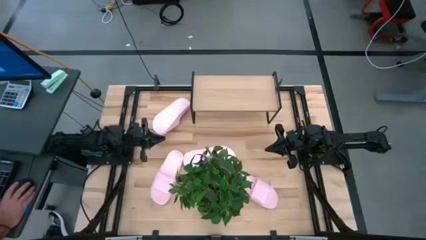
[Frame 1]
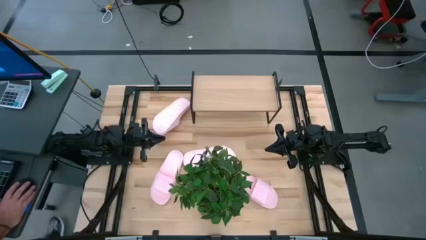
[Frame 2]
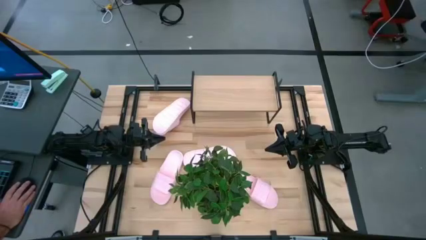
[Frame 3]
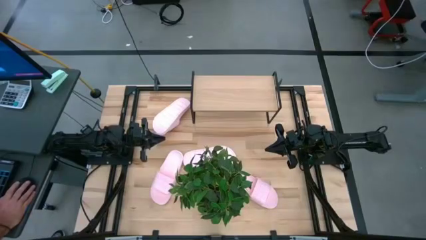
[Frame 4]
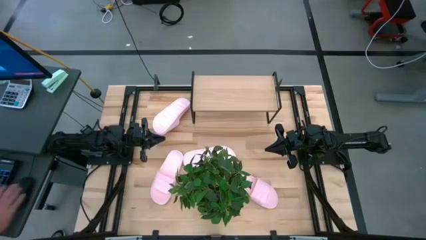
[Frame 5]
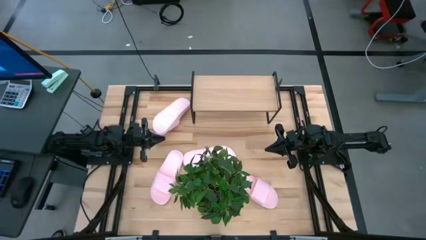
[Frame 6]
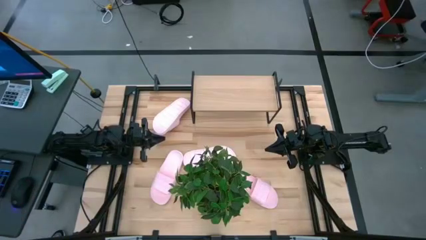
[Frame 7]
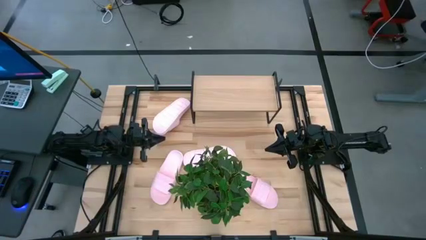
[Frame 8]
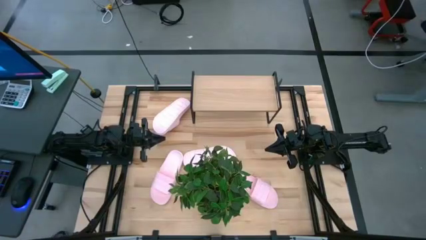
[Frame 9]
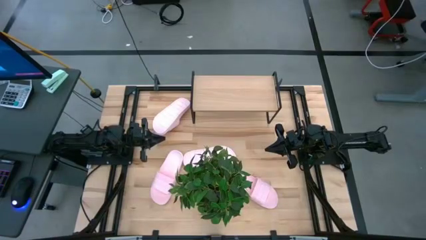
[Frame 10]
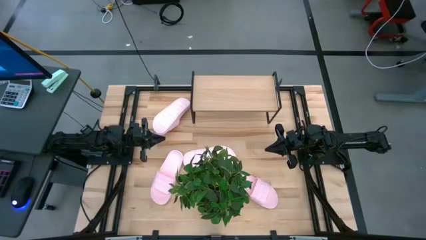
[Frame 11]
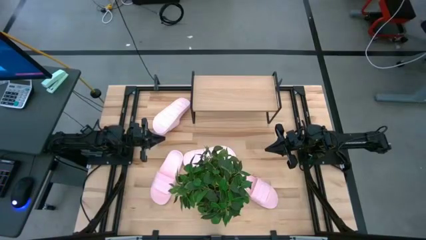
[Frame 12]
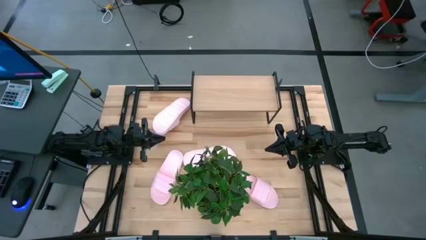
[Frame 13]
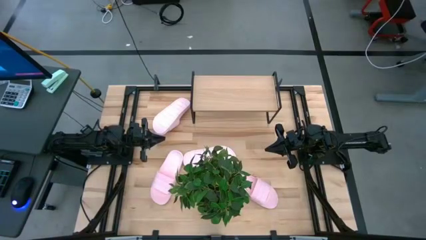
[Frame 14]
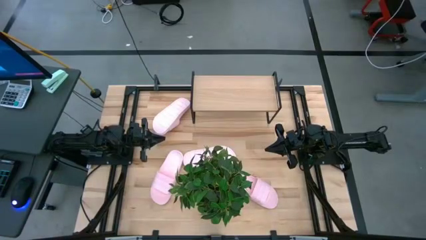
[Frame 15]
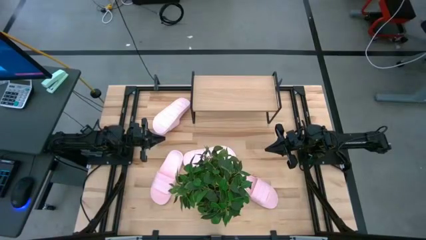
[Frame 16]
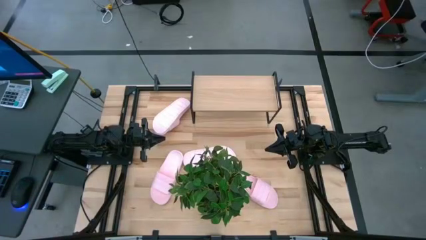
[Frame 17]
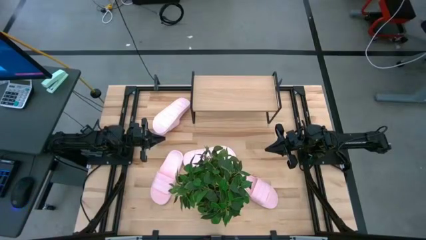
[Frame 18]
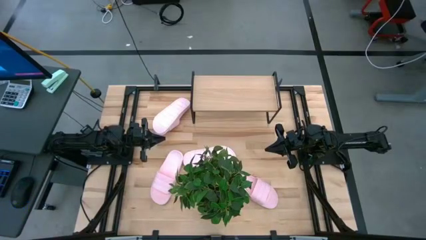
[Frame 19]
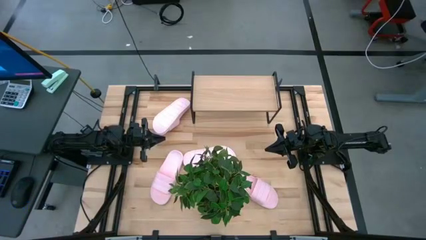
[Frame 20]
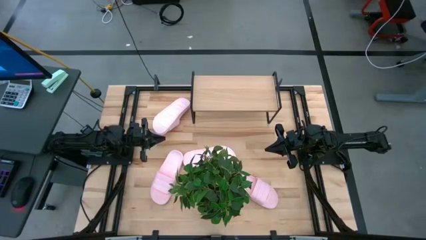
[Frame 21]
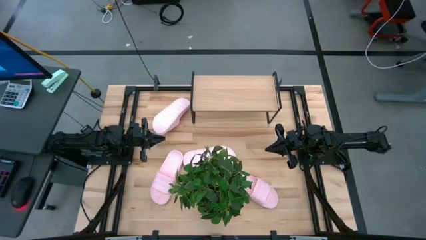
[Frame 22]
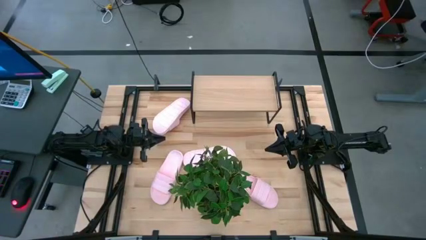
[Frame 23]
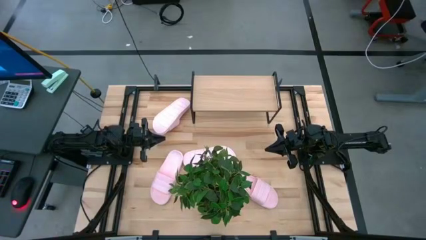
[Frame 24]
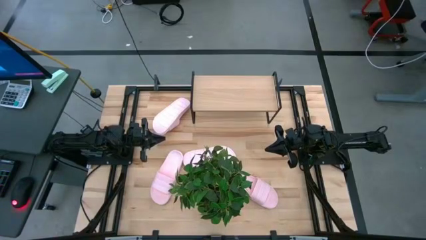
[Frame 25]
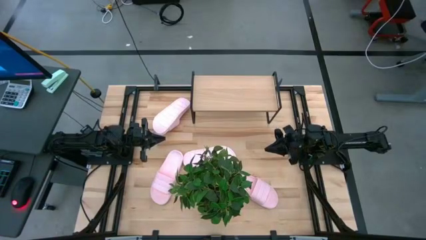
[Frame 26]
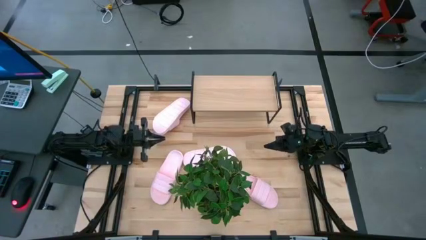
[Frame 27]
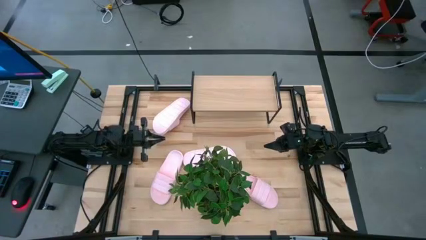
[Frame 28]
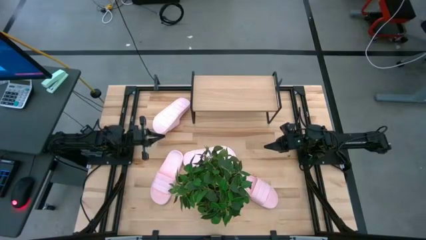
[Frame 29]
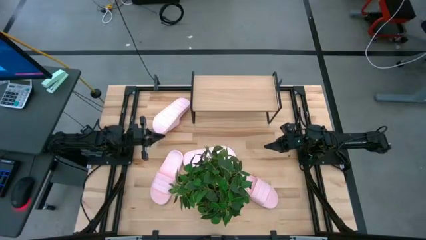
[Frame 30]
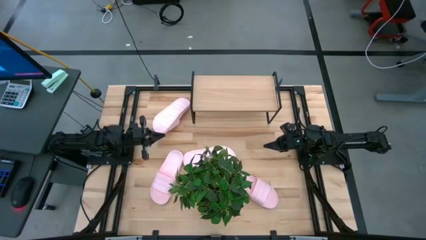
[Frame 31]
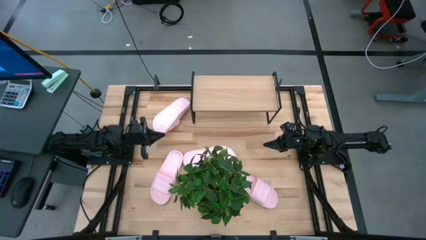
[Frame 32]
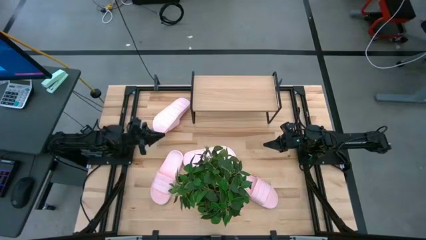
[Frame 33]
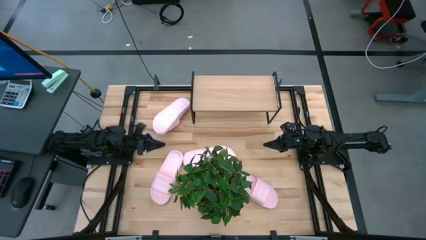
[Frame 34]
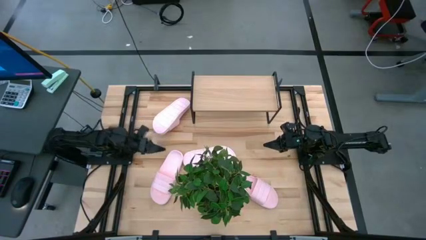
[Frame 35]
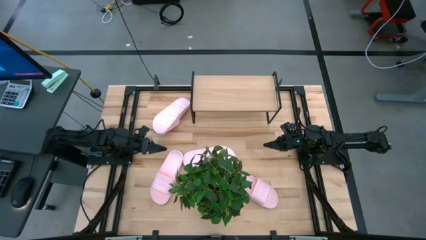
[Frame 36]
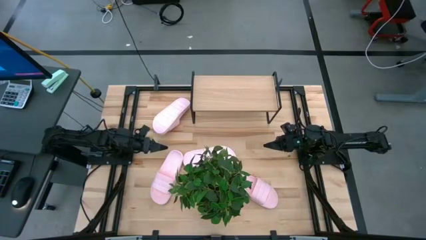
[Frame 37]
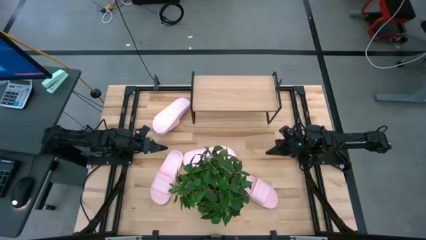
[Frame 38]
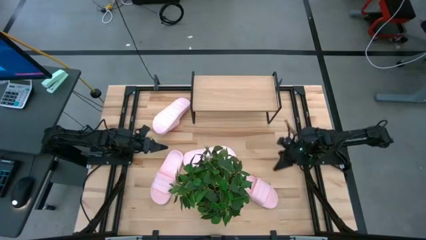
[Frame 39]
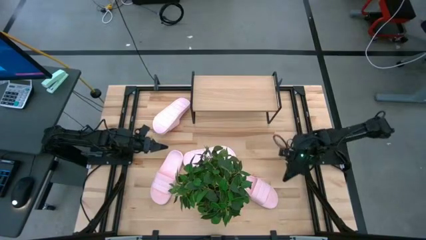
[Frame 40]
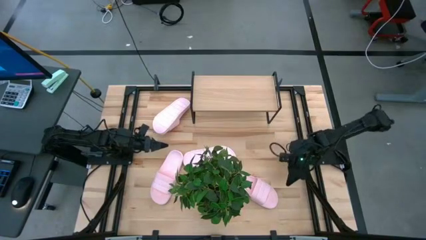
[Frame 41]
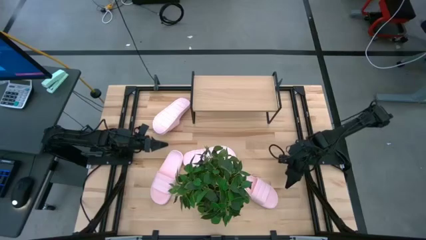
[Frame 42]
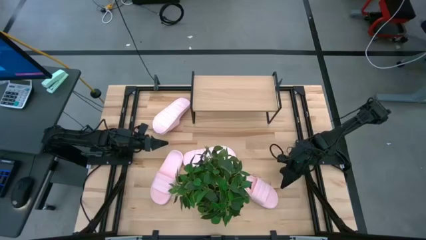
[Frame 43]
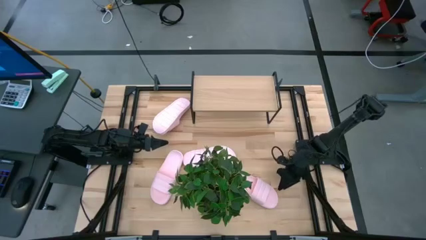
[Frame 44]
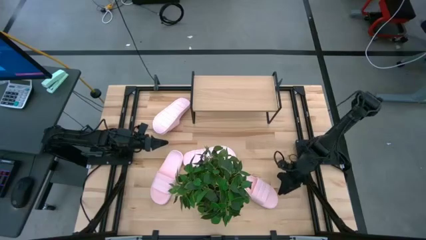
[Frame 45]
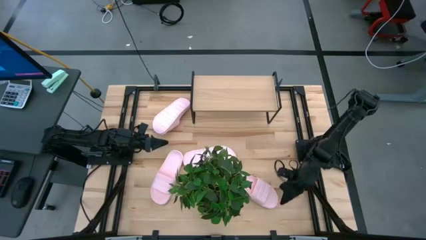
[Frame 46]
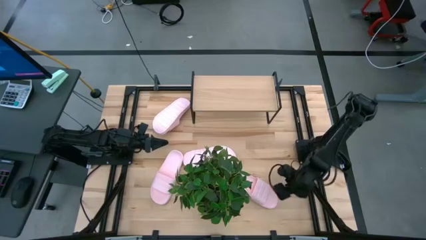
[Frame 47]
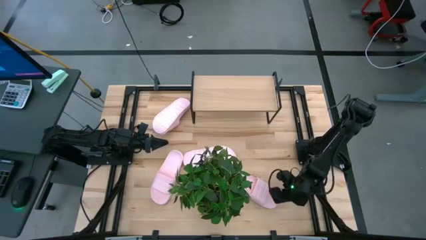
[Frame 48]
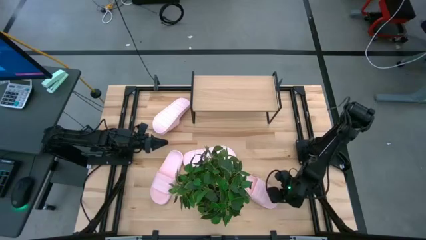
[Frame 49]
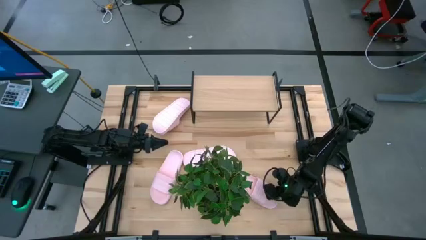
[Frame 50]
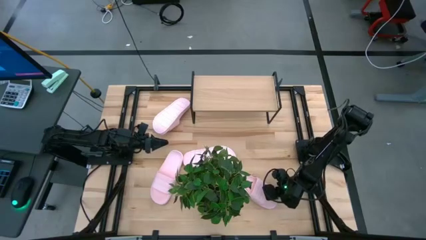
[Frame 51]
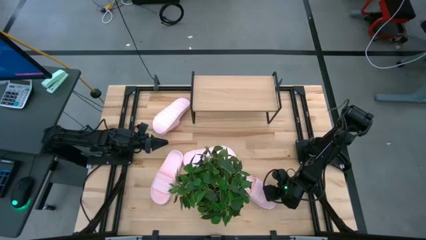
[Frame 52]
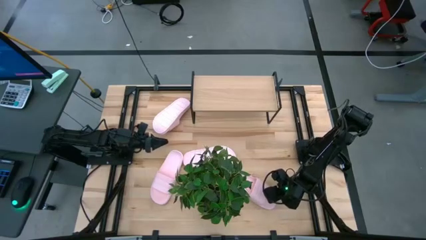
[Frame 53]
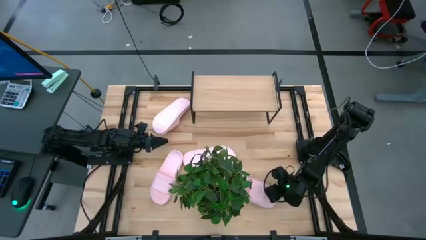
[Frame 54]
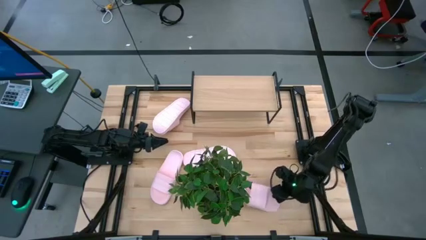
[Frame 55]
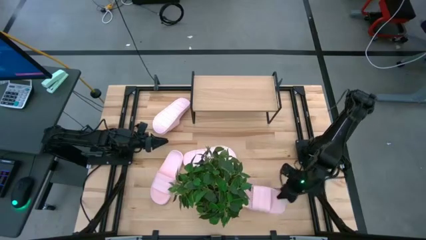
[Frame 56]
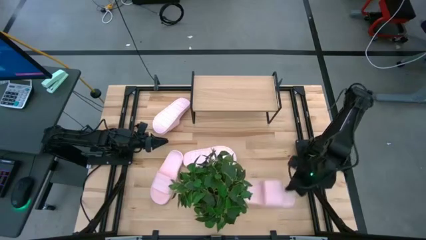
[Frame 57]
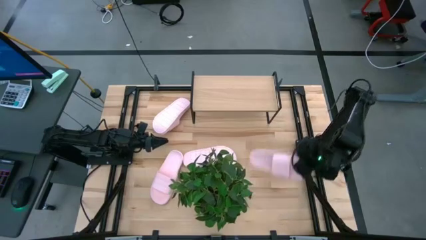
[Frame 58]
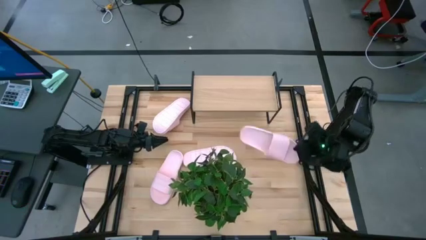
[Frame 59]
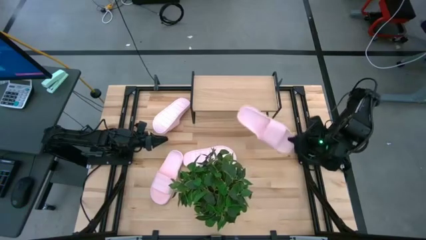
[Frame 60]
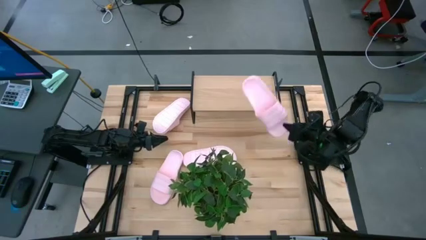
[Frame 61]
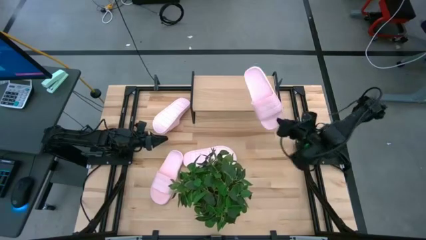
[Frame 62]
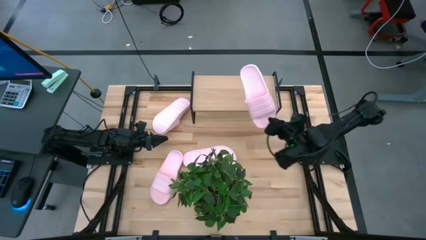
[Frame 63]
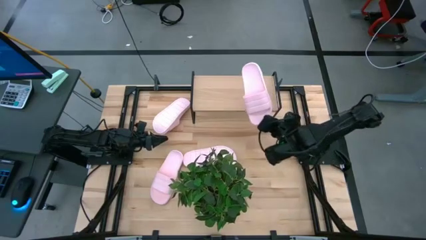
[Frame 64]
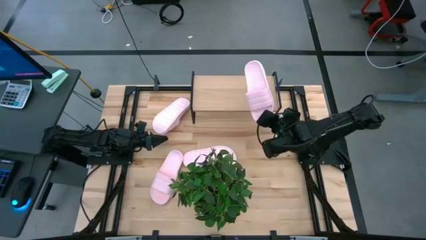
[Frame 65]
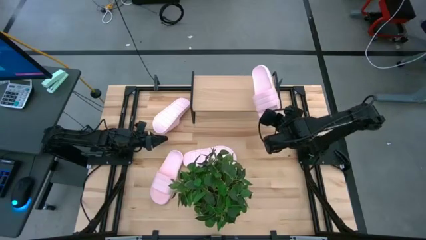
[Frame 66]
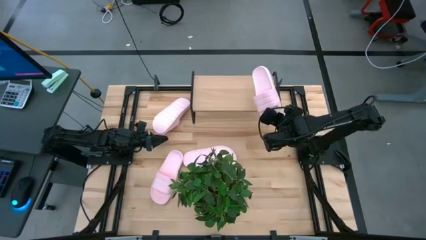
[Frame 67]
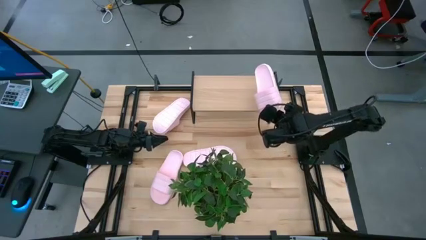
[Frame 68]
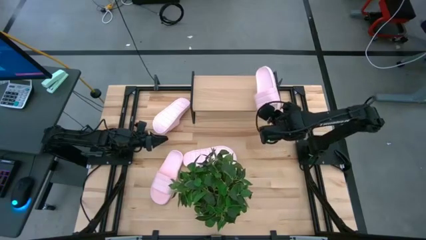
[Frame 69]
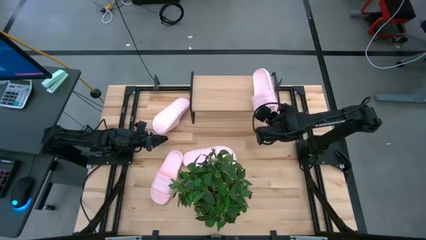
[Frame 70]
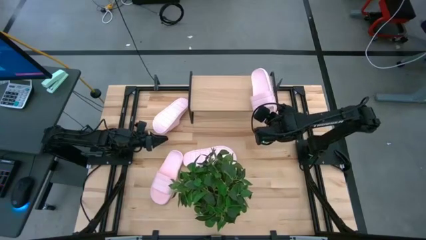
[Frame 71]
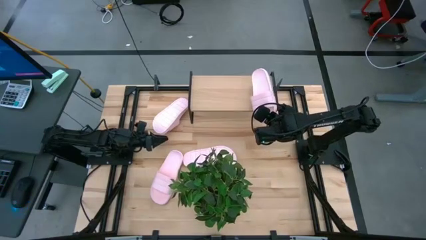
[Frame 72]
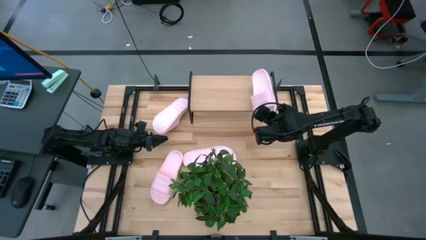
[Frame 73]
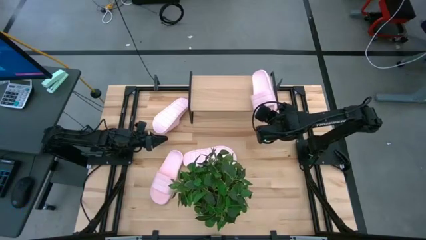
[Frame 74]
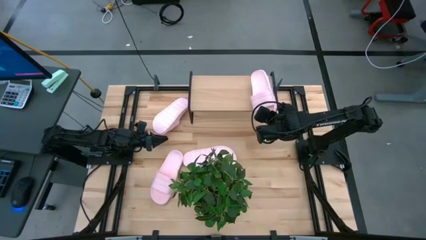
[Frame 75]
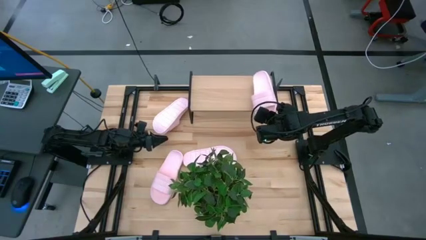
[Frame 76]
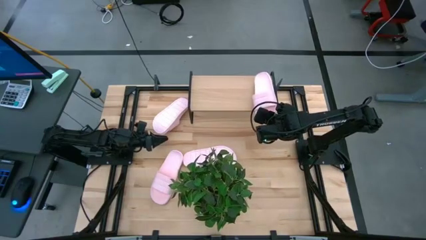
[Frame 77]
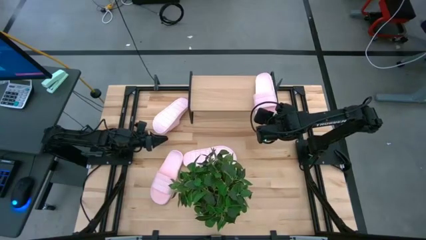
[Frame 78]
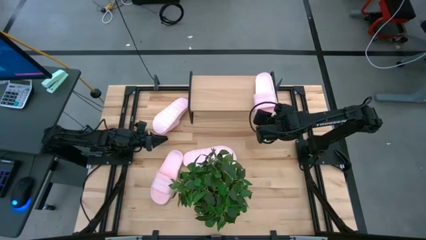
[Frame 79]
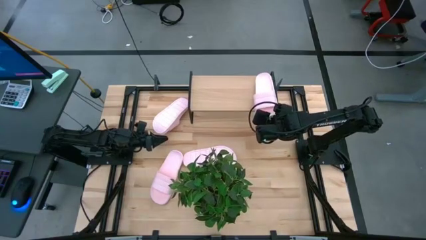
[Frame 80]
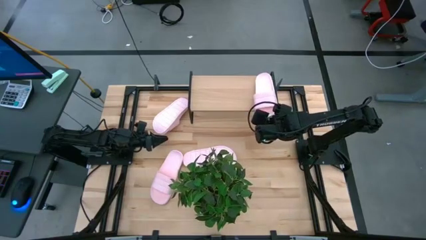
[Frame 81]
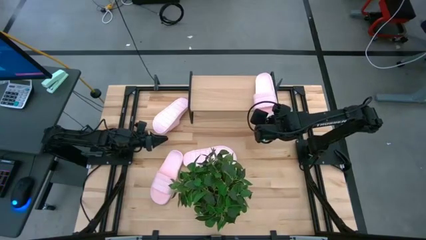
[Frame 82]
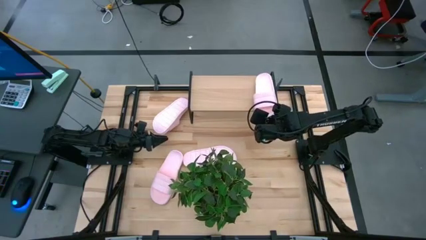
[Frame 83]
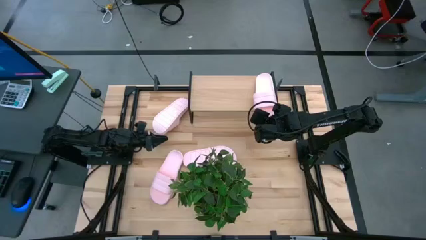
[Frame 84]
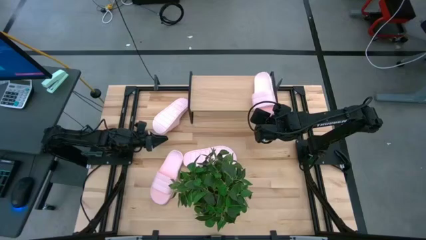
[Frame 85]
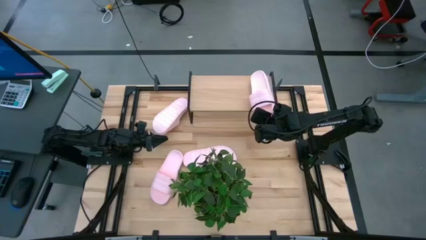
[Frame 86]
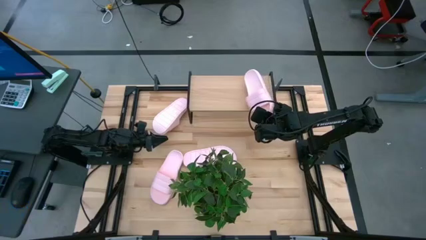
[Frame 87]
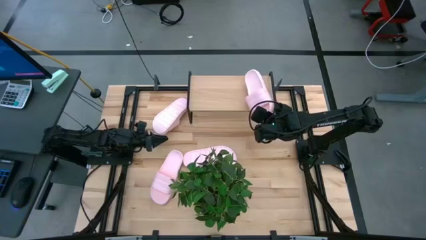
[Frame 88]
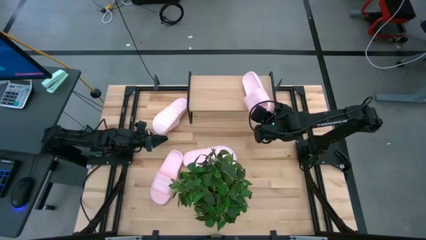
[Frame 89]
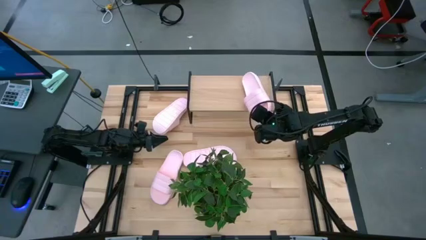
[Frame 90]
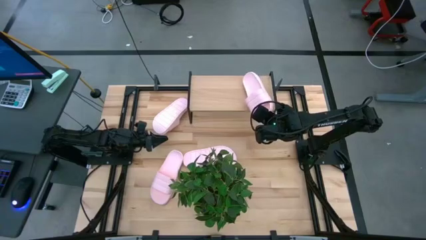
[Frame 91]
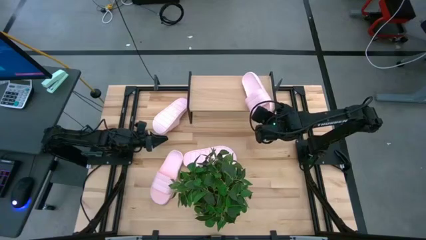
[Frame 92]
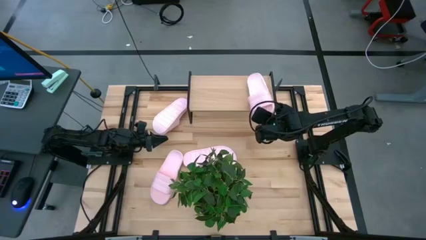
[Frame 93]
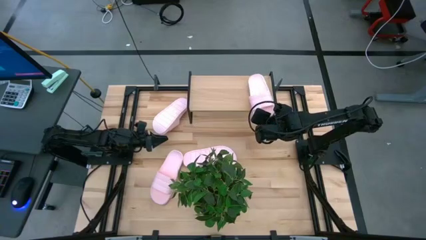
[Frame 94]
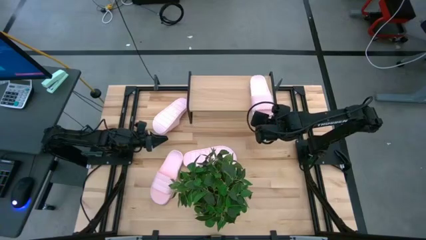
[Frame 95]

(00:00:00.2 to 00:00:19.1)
Task: Pick and place slides into the shelf
Put the slide on the shelf
